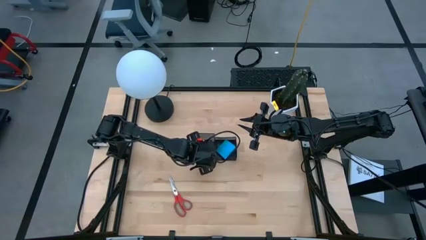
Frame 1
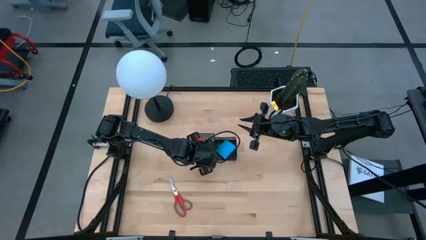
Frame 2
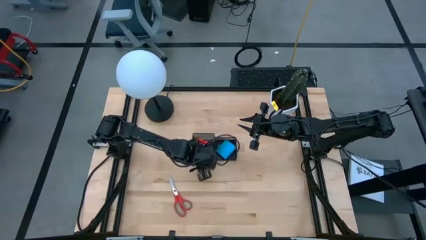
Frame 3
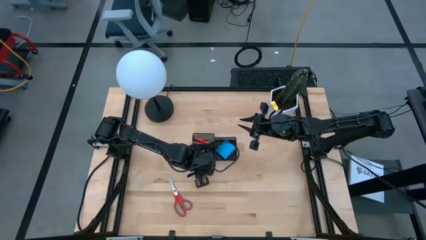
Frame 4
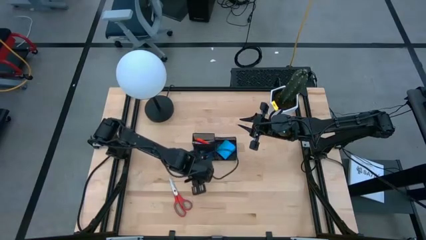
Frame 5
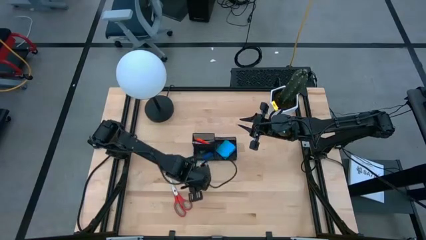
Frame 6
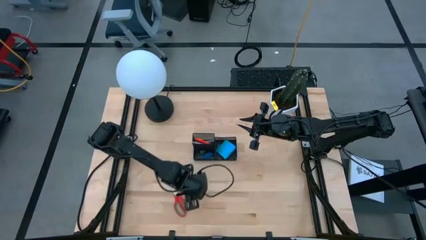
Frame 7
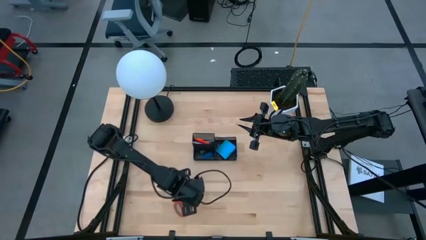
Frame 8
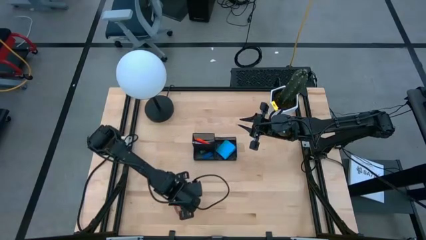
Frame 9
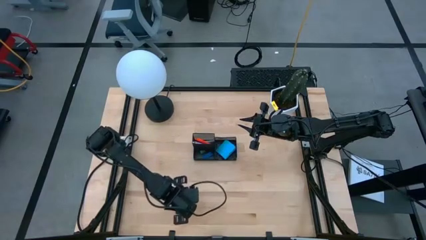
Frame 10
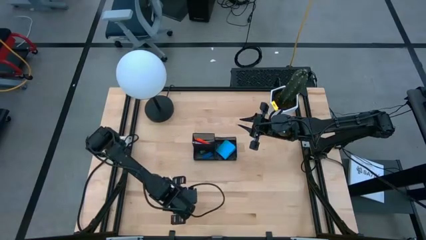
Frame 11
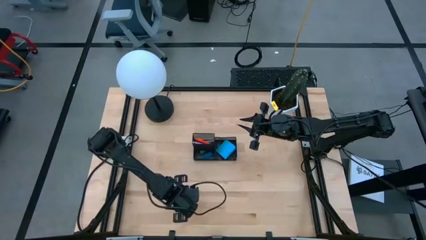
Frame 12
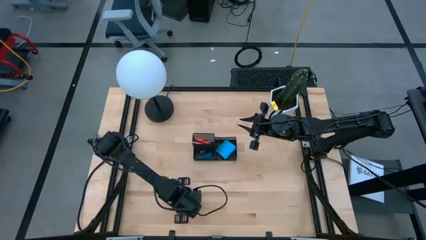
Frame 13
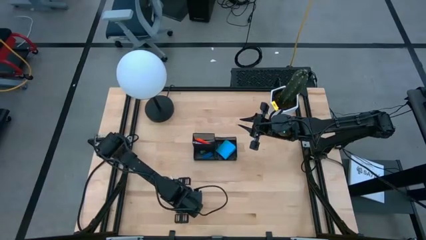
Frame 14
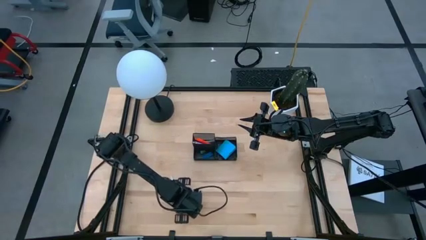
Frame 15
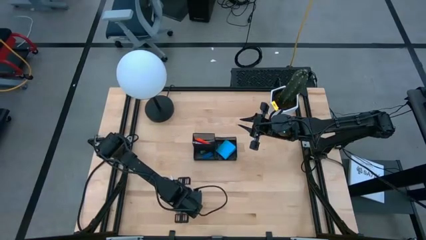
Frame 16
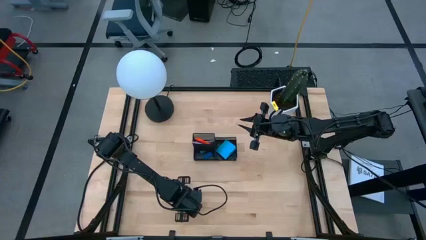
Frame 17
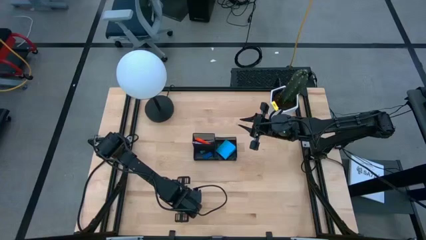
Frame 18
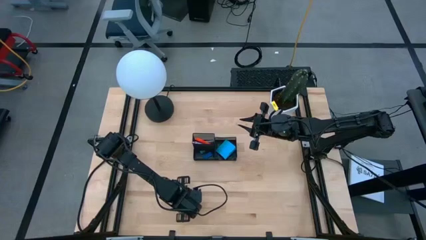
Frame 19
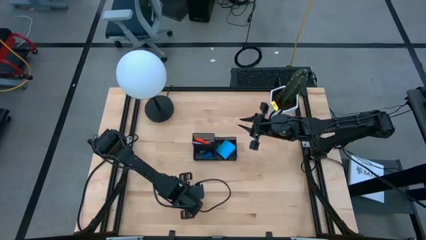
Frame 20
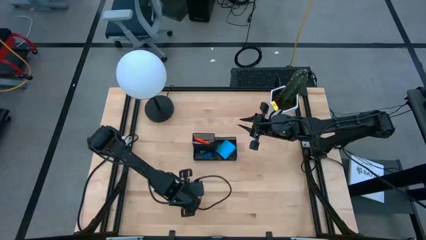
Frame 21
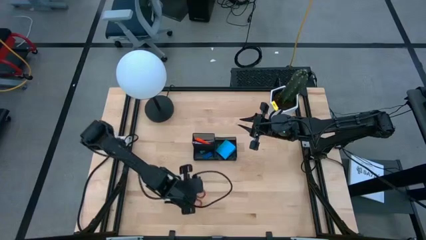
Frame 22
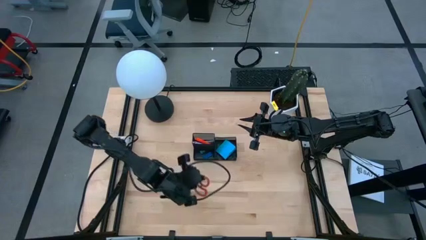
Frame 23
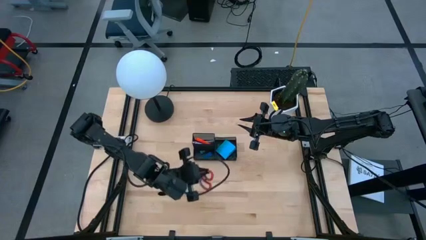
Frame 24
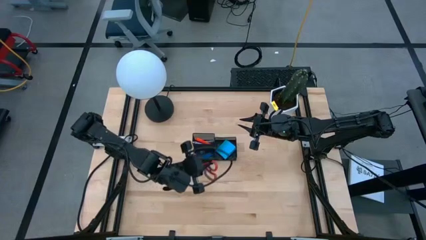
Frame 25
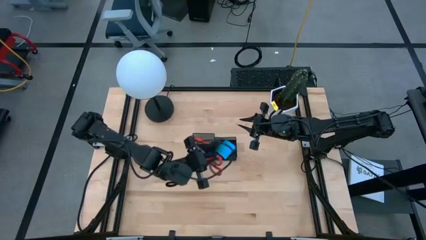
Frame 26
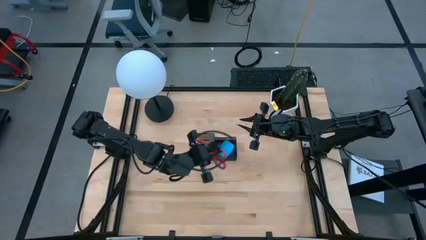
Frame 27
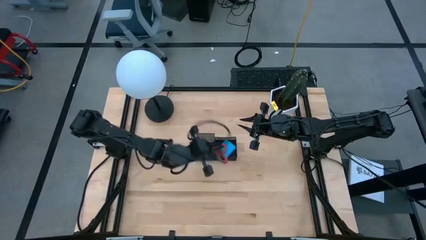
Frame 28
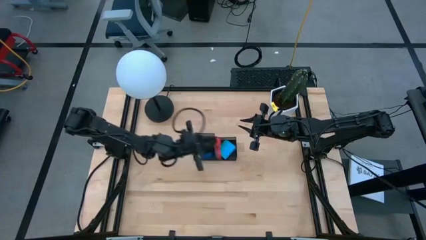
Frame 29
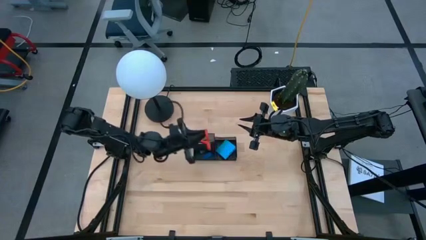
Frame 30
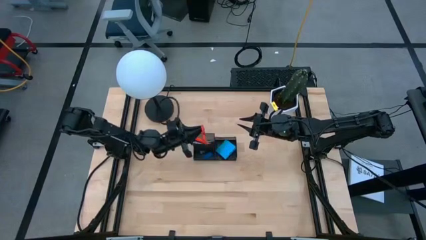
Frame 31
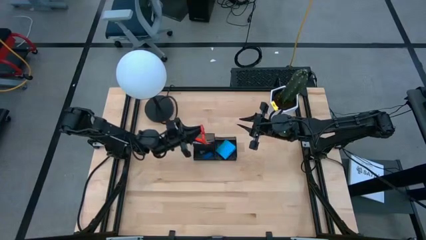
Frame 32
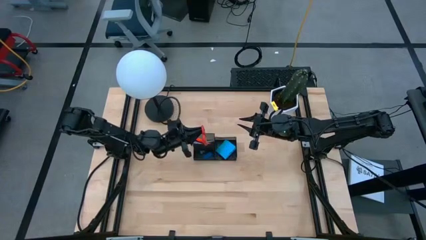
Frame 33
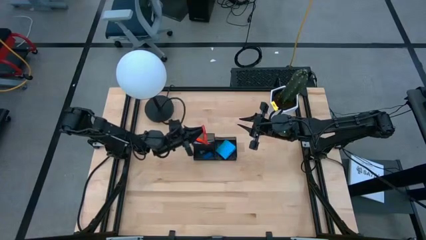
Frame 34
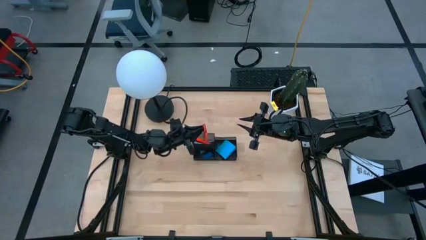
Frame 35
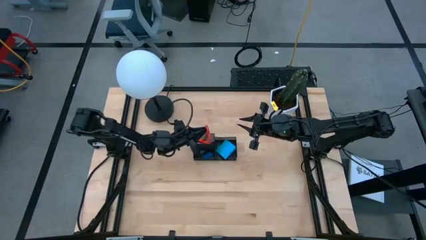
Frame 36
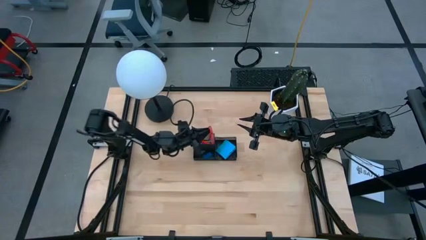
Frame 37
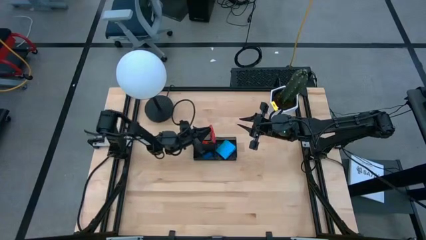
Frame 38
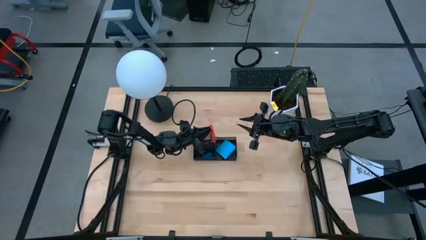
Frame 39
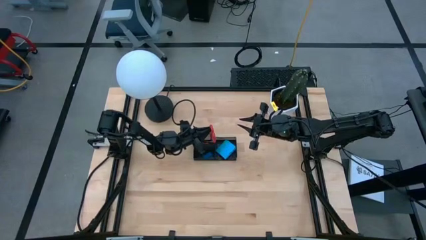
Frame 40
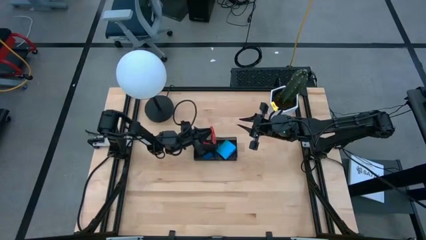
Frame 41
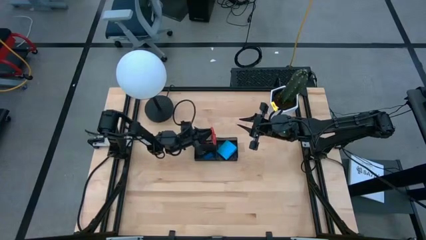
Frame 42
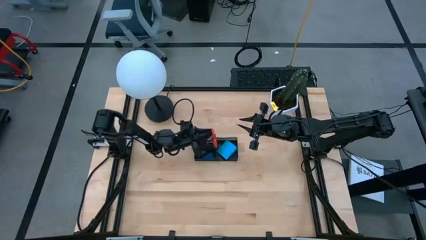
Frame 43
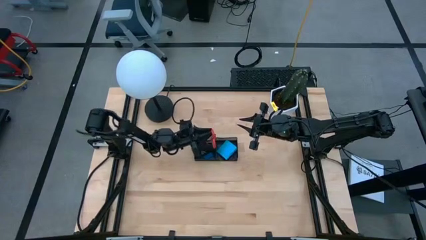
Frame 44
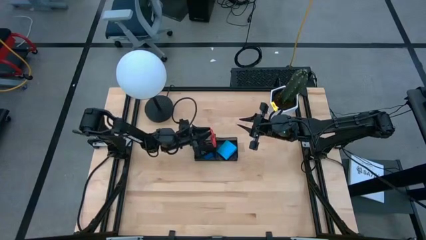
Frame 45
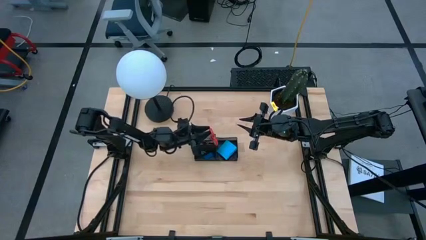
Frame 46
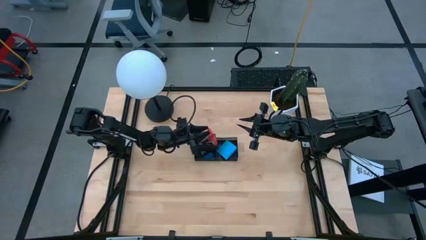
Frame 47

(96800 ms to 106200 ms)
Task: Pick and place office supplies into organizer
Put the orange scissor into the black desk organizer
